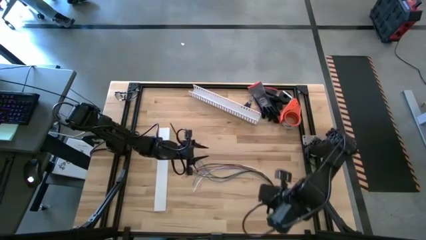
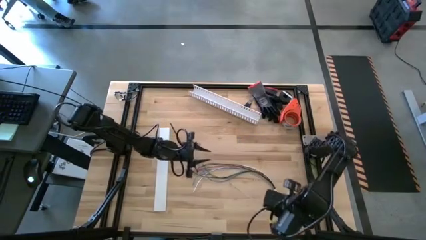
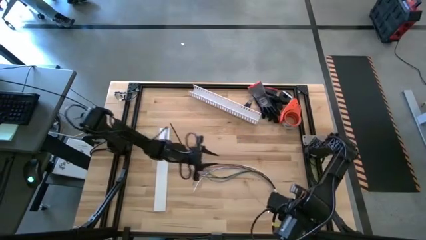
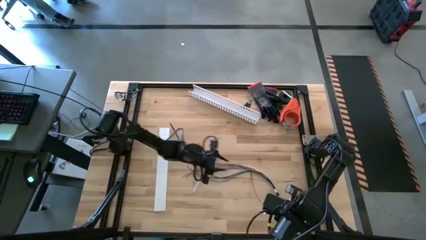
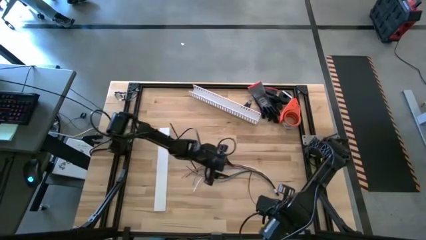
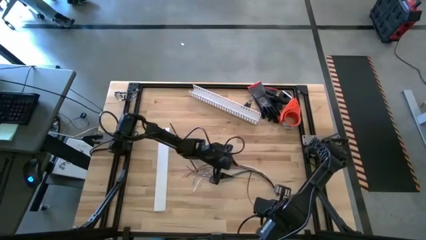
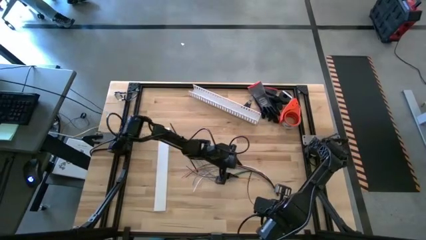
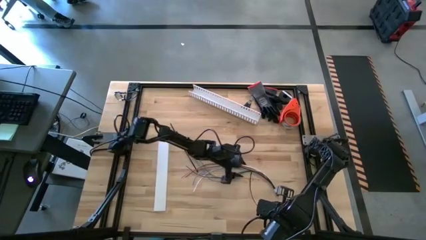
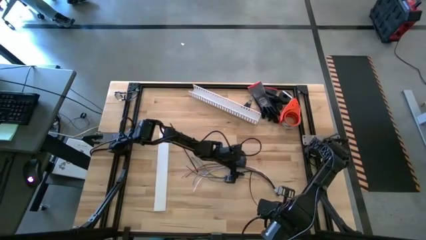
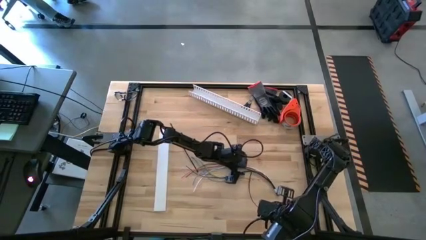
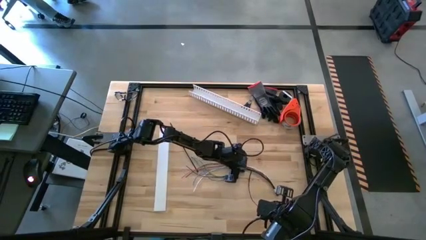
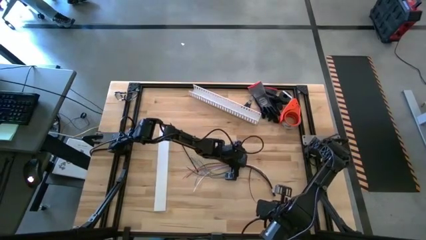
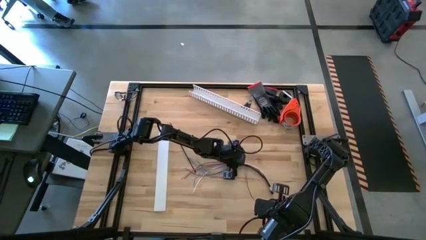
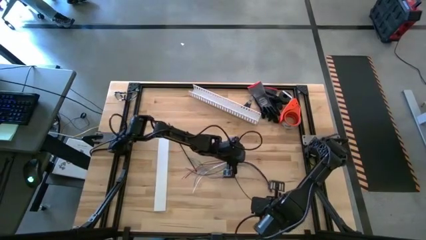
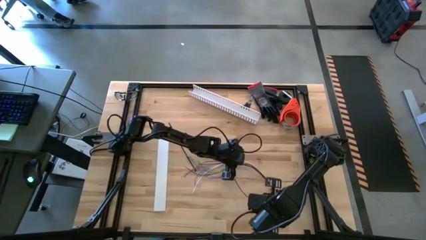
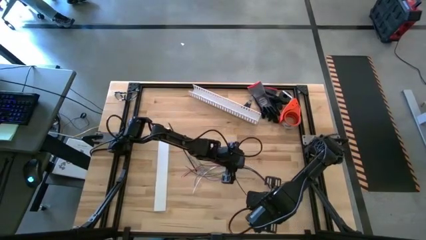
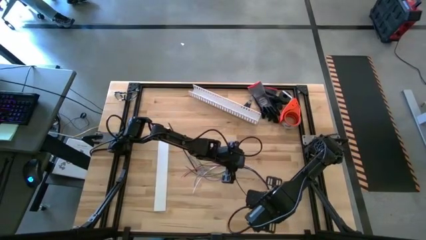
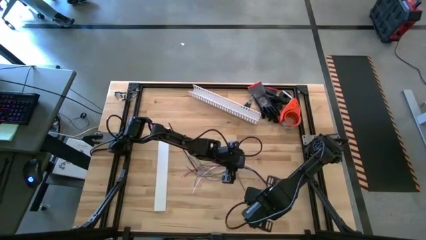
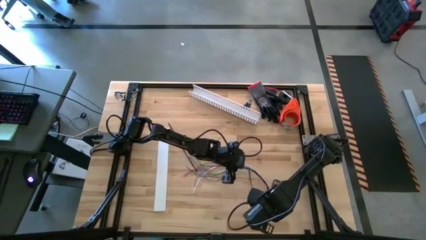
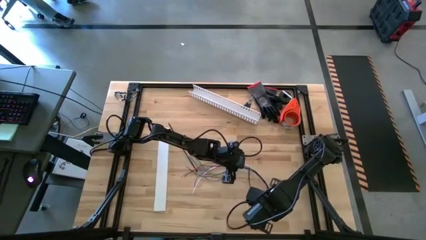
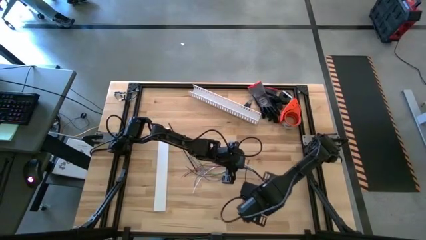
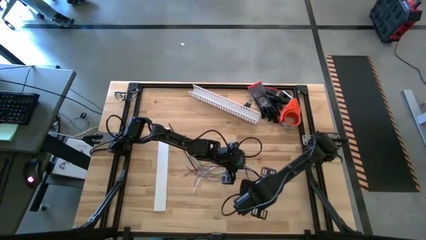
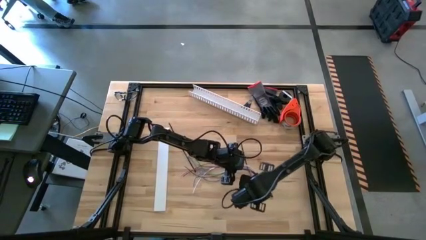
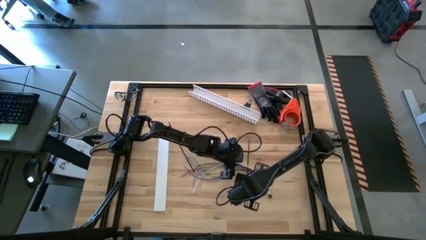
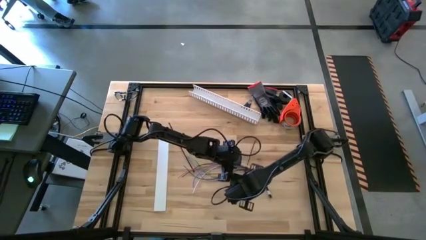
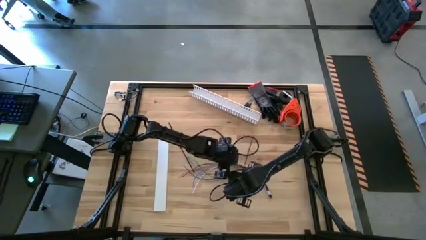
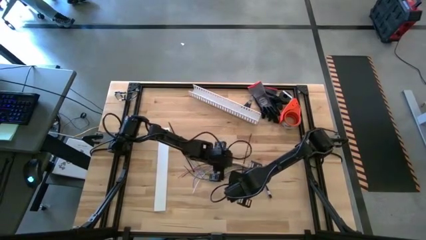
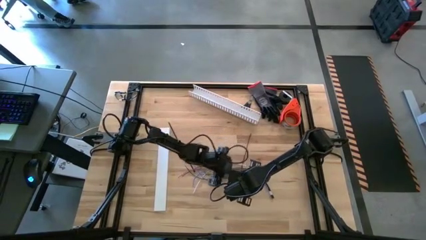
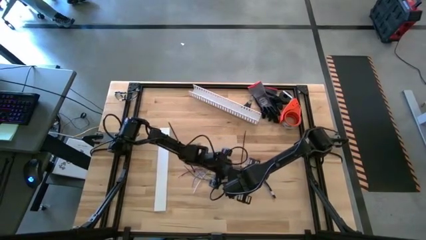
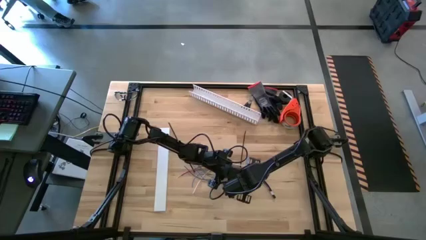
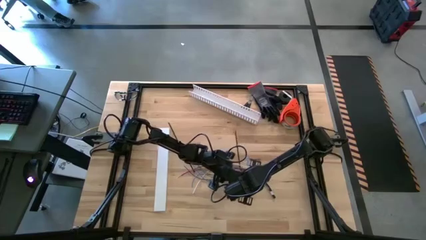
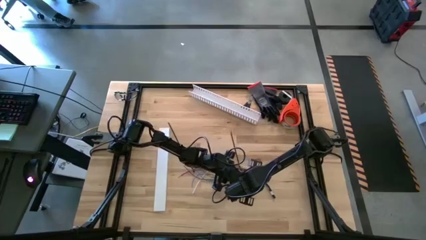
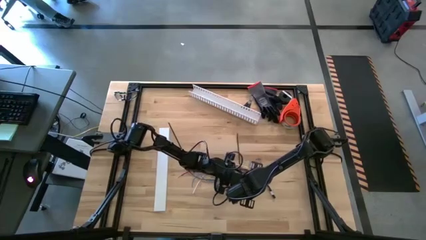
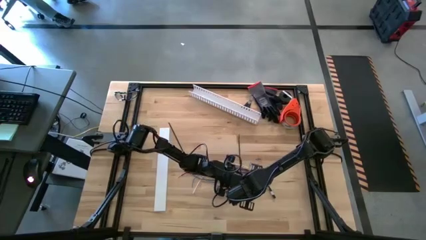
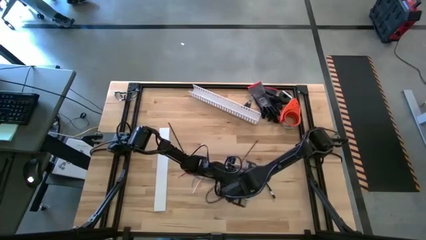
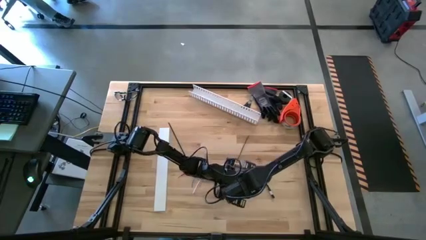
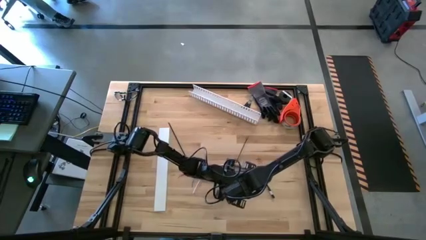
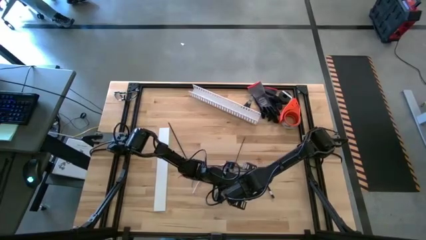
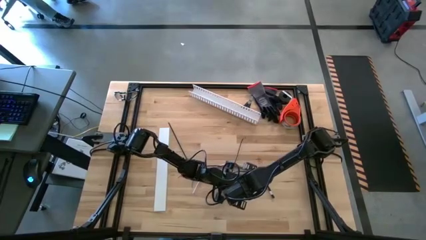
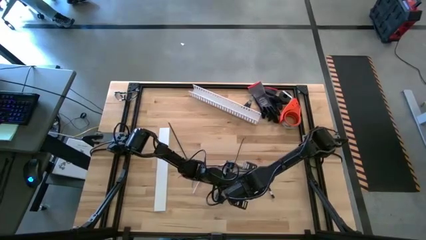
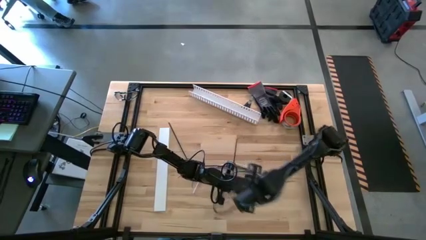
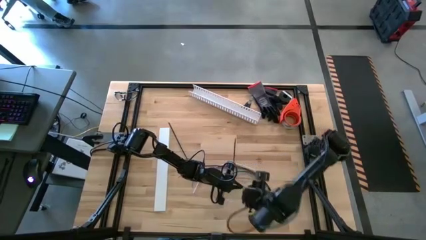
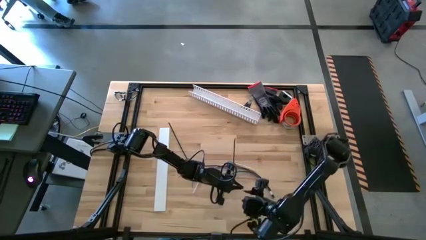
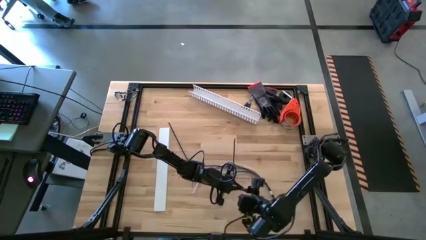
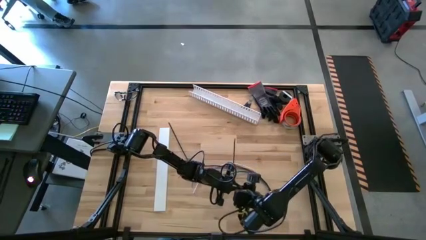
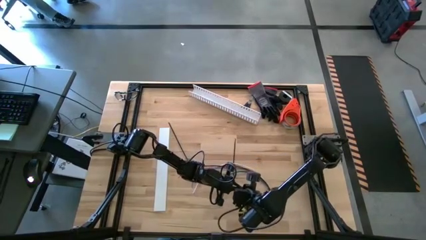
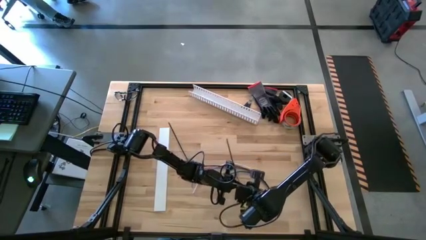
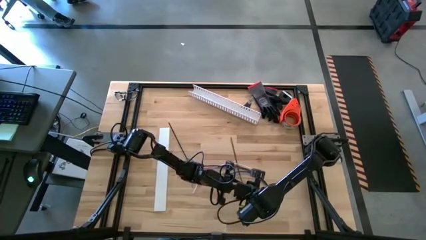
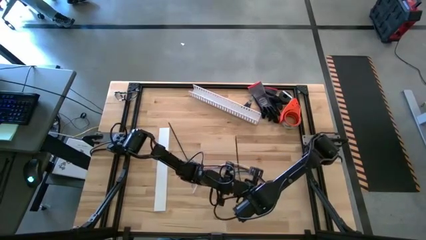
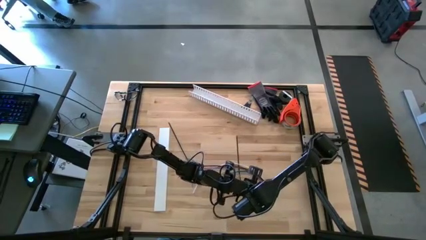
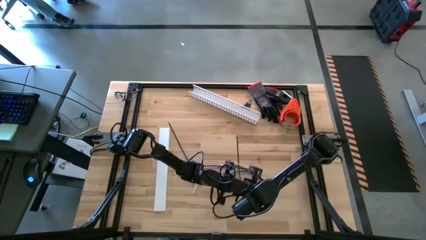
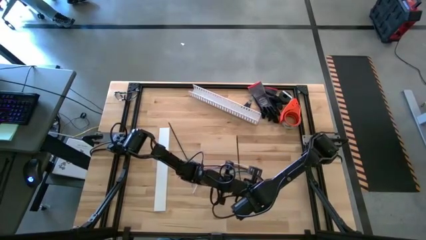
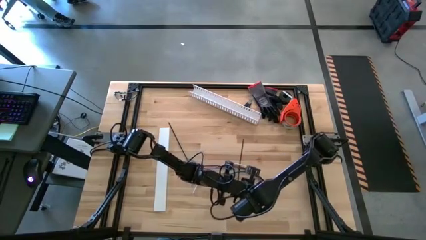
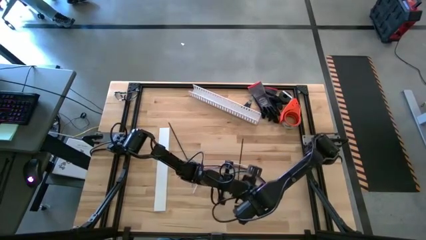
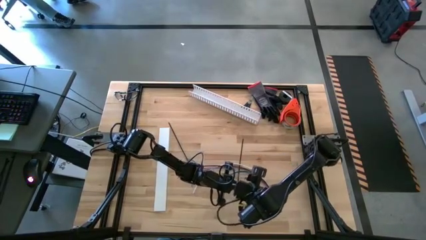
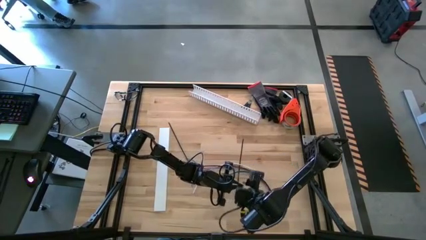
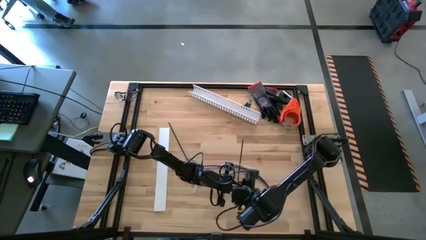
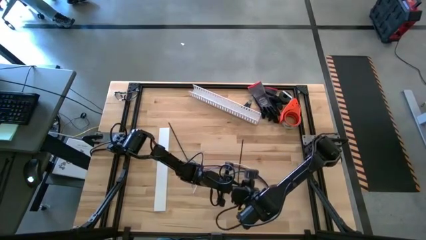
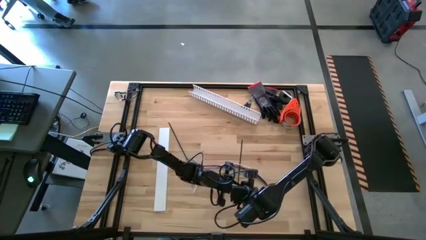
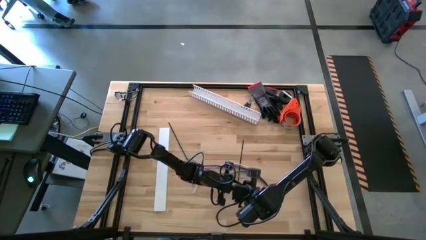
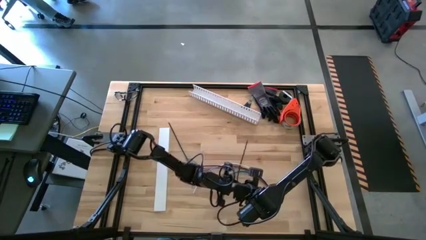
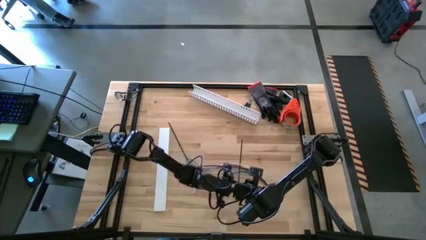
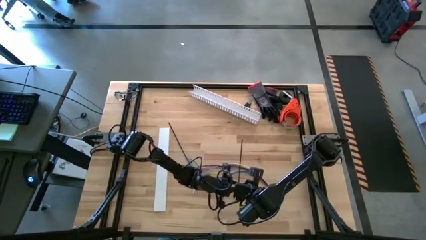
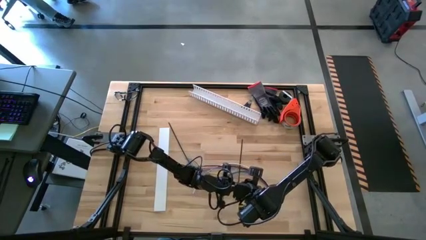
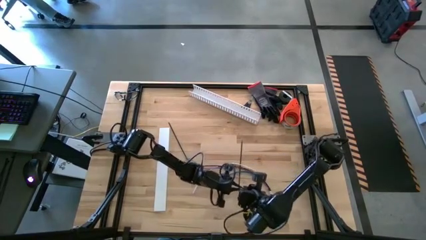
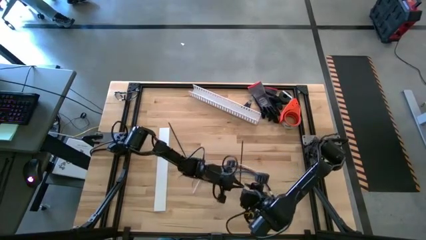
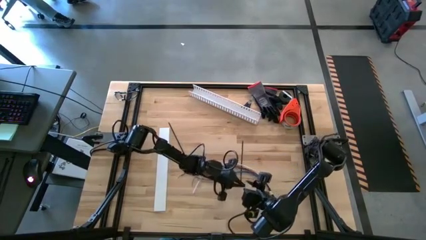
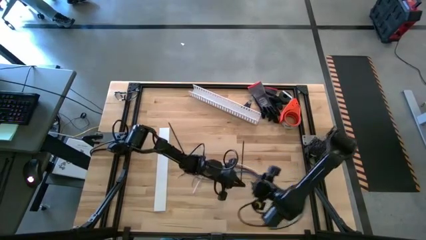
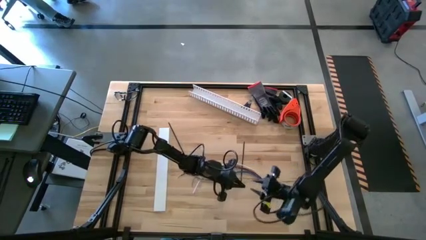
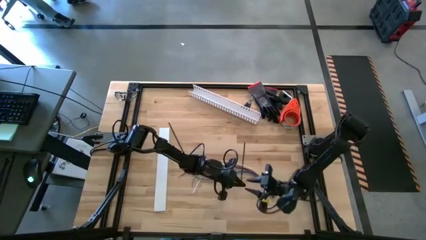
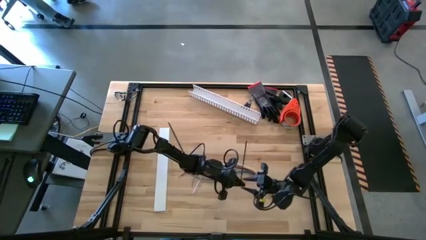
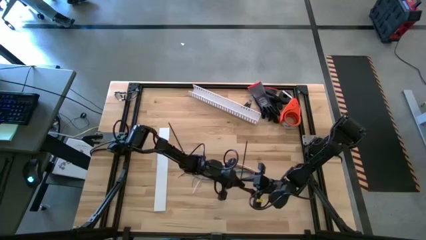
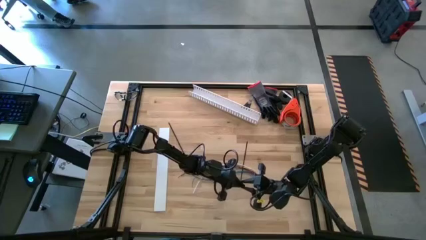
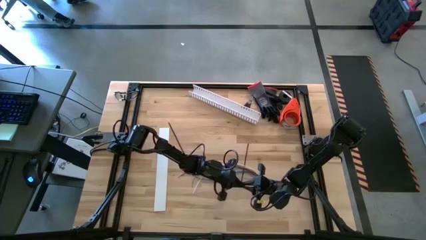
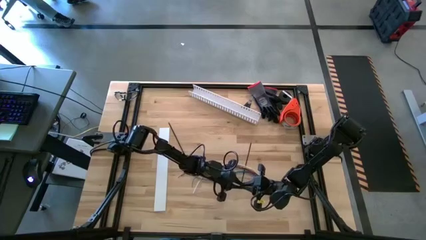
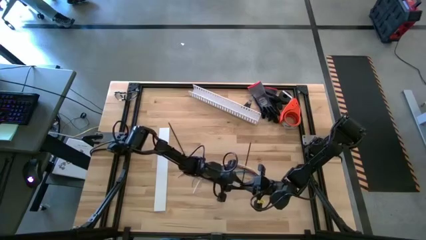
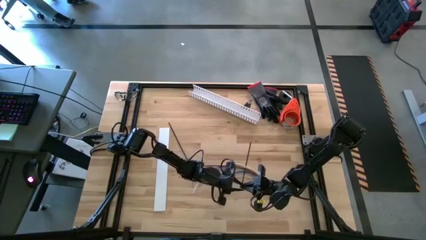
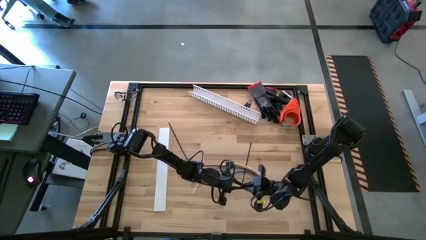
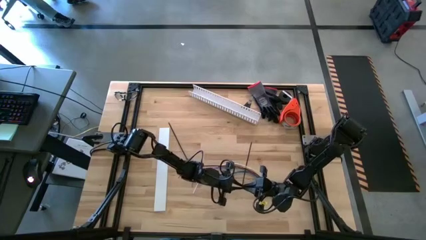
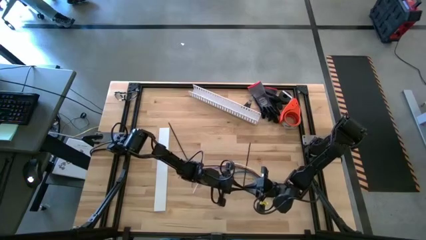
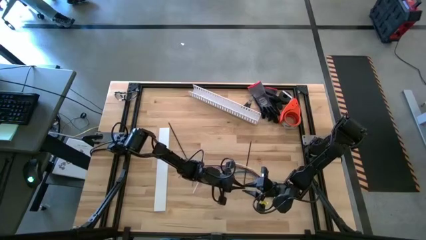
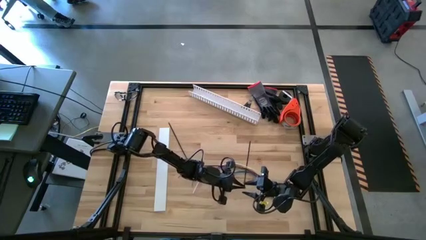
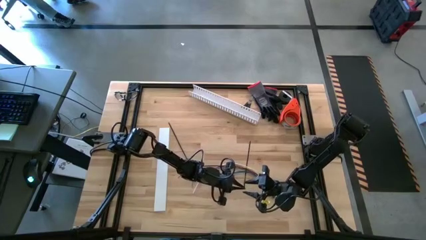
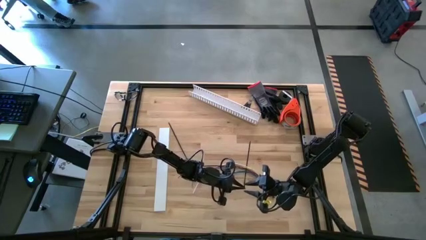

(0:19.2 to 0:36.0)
Task: Ziptie cables
Wrap the right zip tie on the cable
